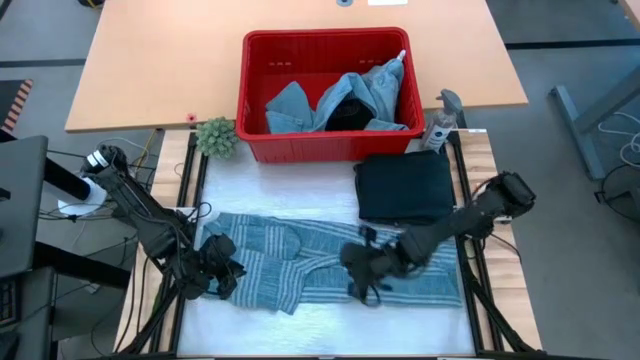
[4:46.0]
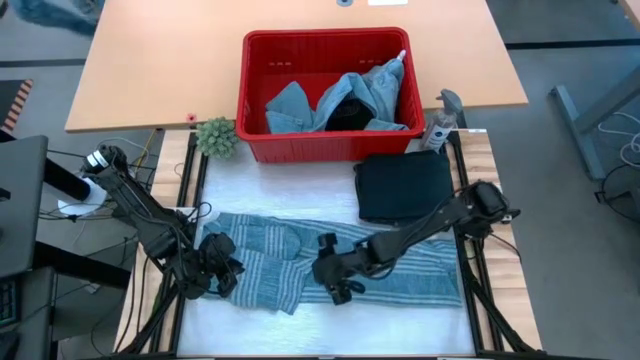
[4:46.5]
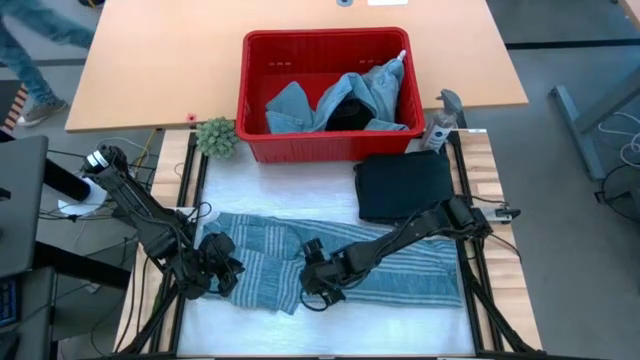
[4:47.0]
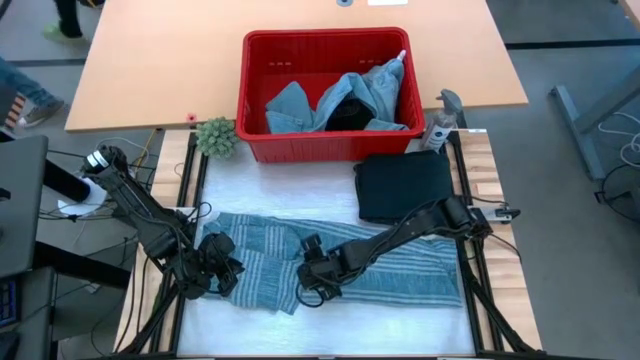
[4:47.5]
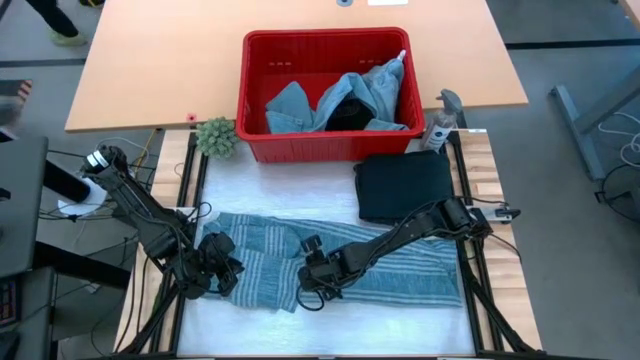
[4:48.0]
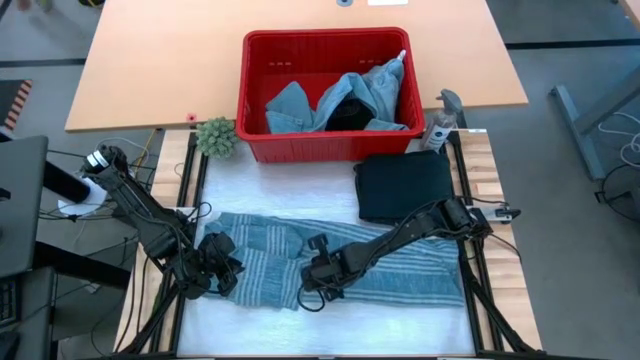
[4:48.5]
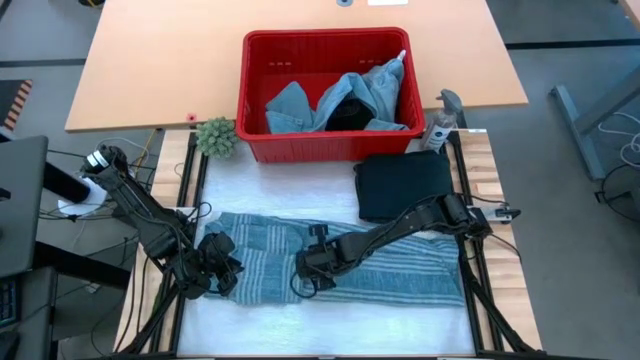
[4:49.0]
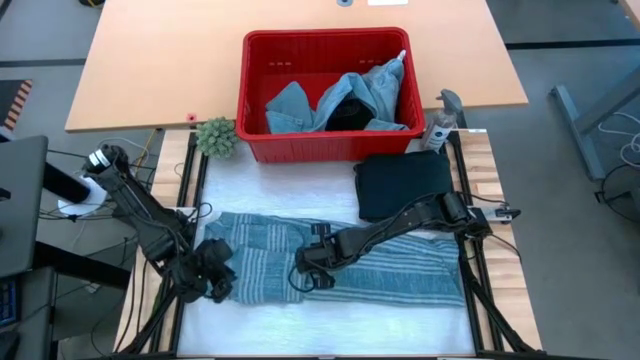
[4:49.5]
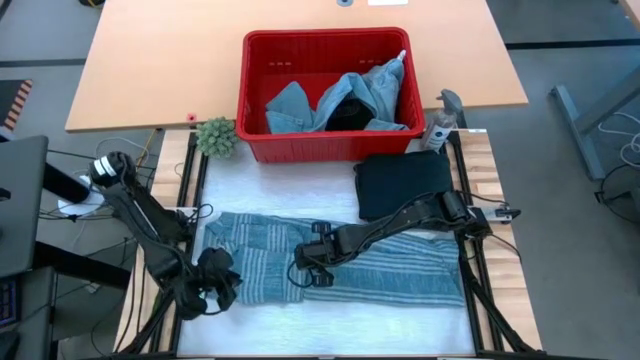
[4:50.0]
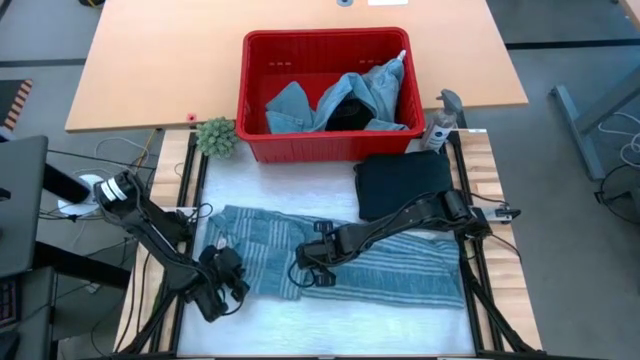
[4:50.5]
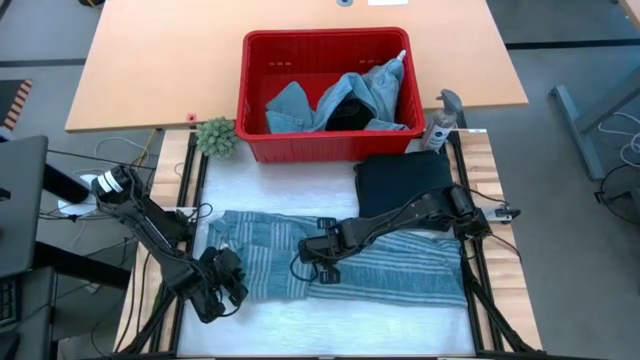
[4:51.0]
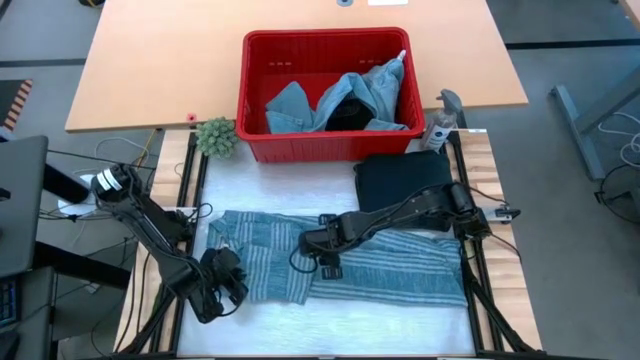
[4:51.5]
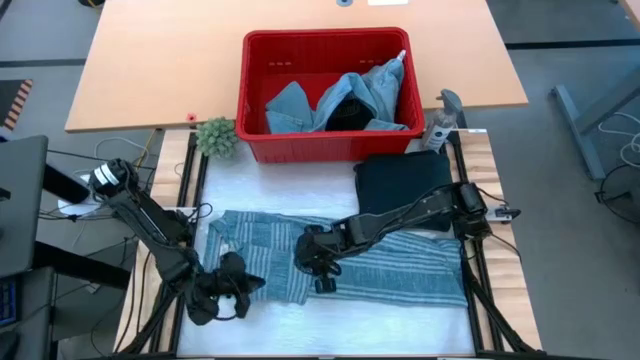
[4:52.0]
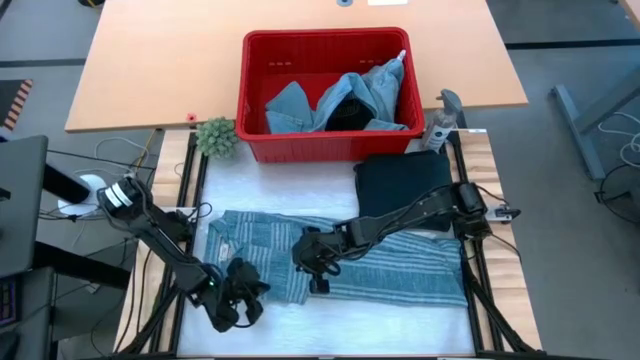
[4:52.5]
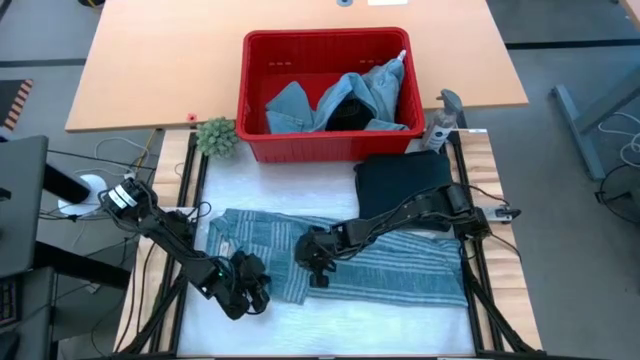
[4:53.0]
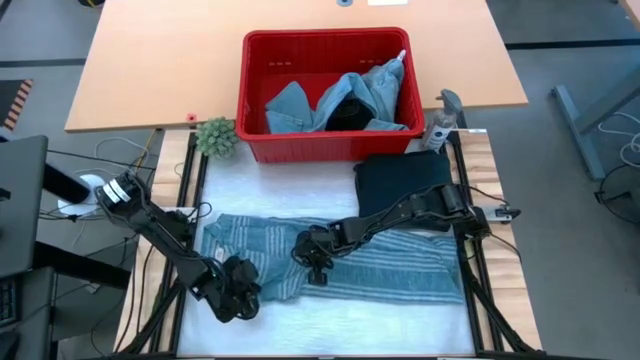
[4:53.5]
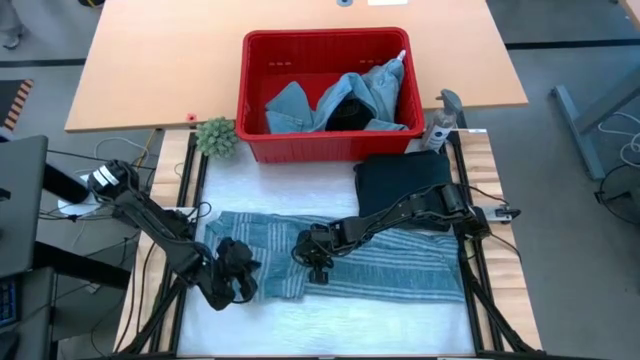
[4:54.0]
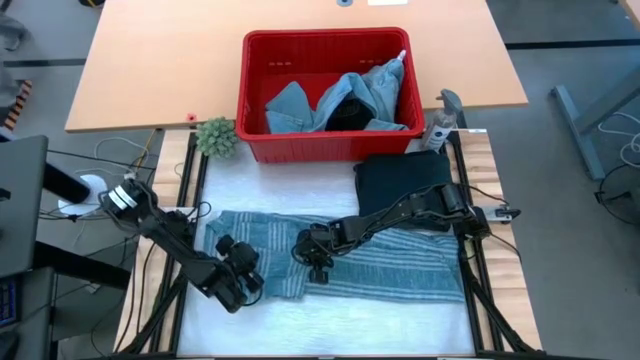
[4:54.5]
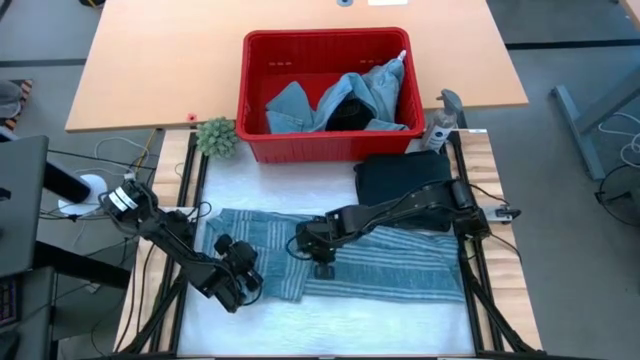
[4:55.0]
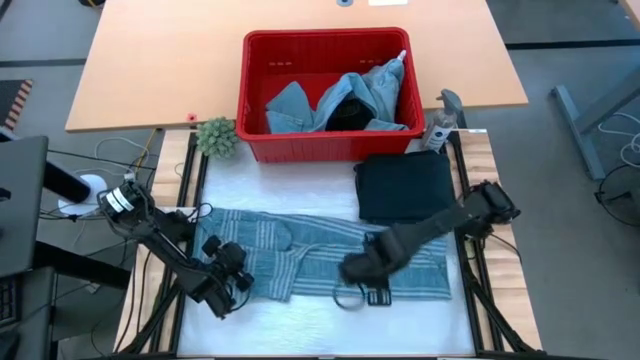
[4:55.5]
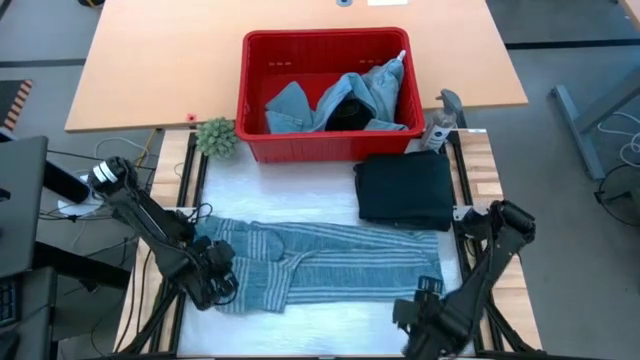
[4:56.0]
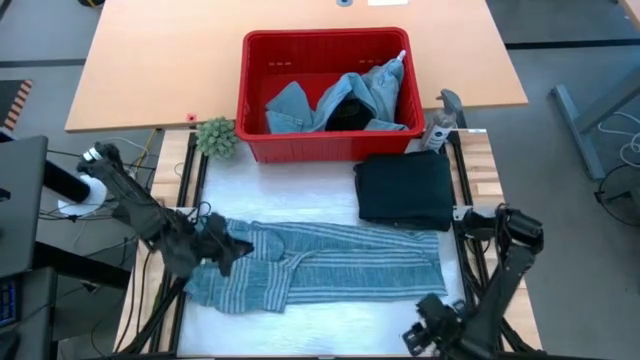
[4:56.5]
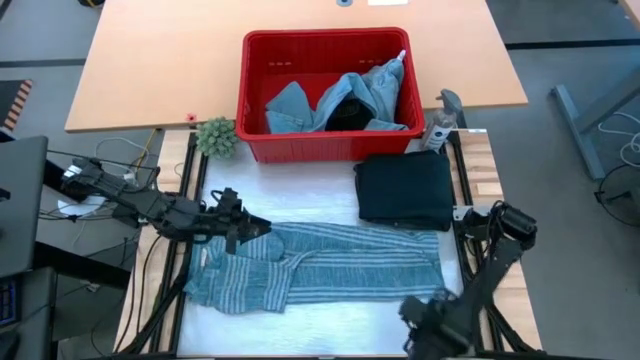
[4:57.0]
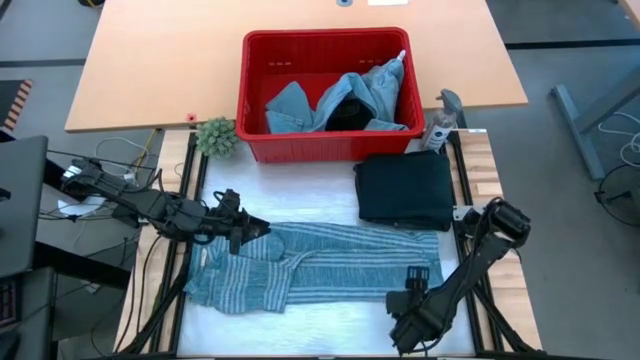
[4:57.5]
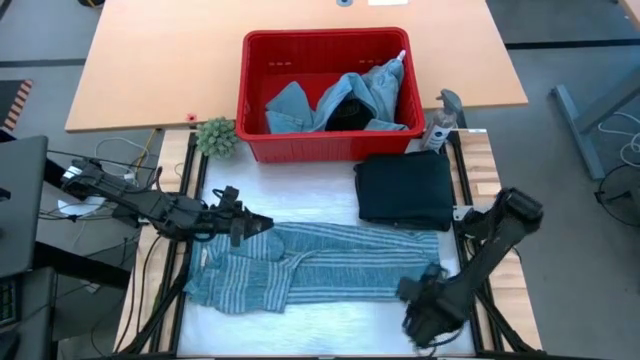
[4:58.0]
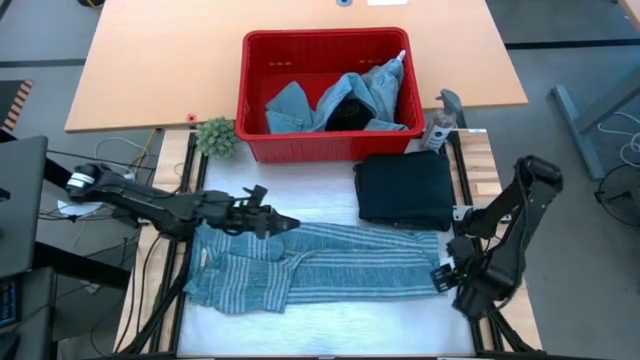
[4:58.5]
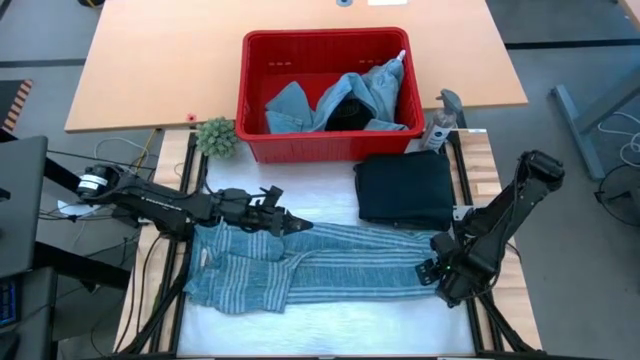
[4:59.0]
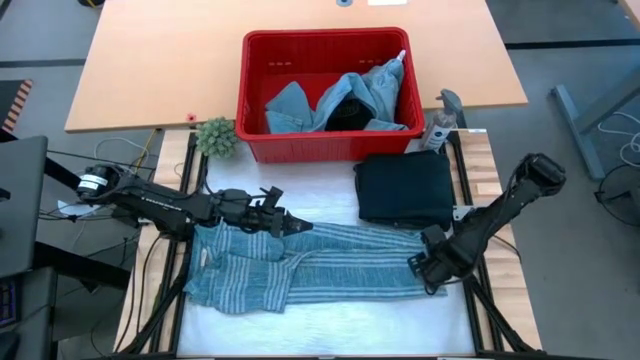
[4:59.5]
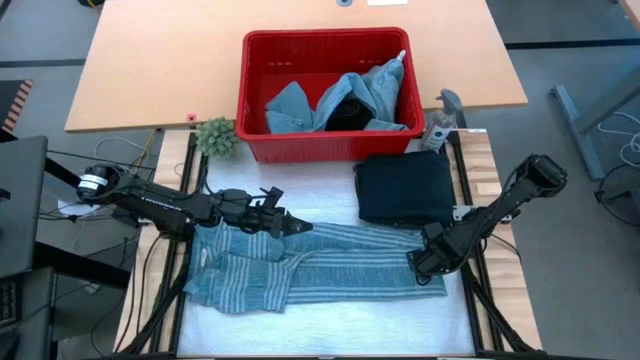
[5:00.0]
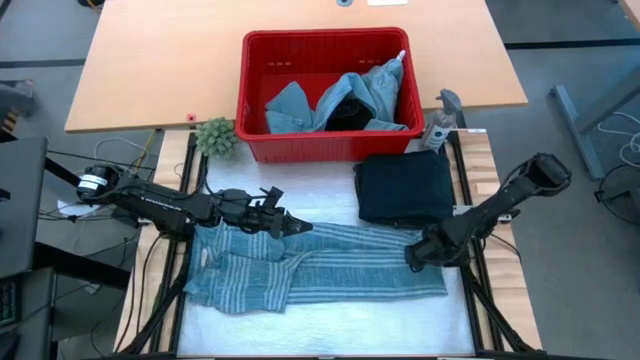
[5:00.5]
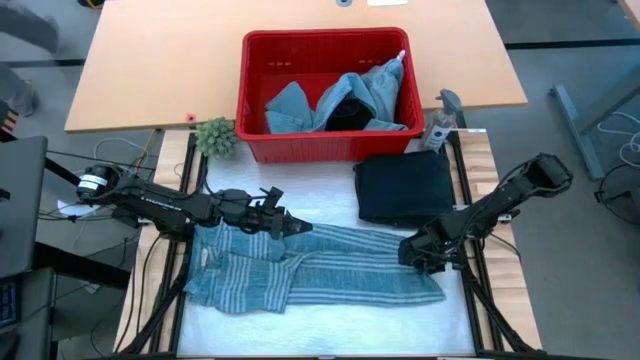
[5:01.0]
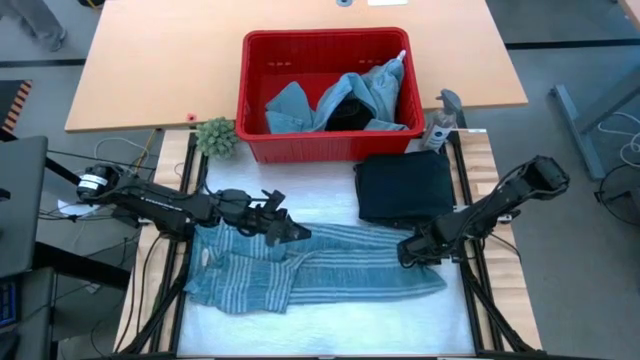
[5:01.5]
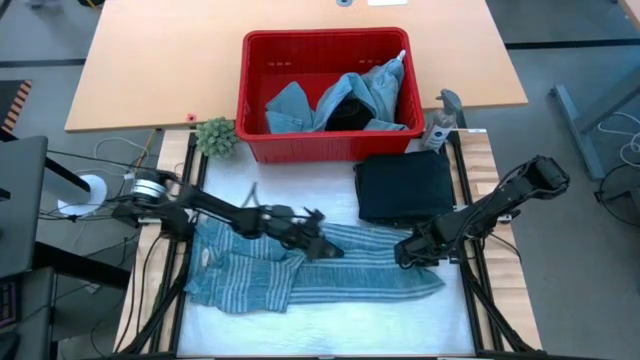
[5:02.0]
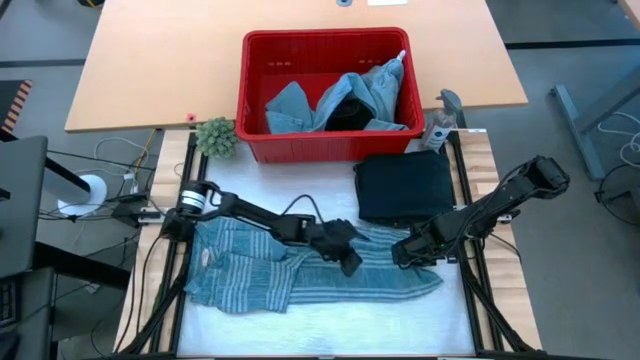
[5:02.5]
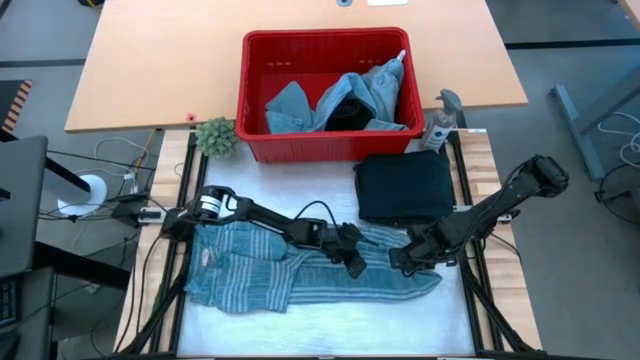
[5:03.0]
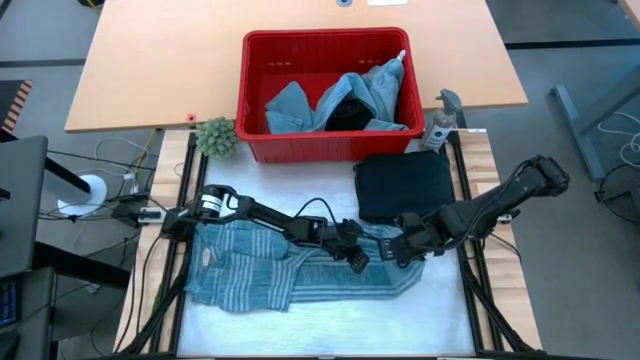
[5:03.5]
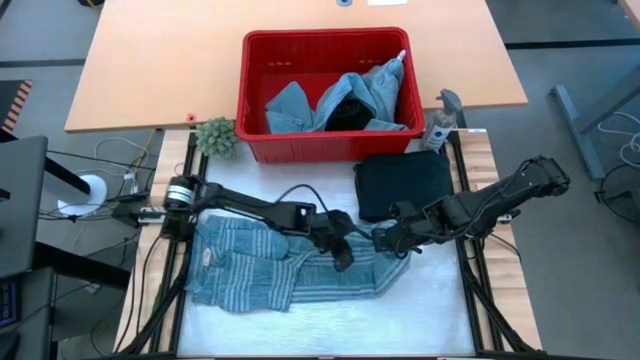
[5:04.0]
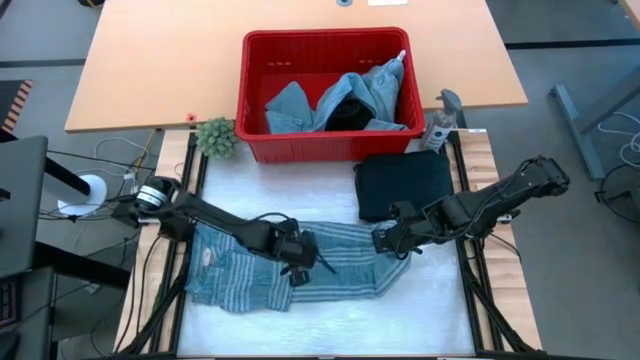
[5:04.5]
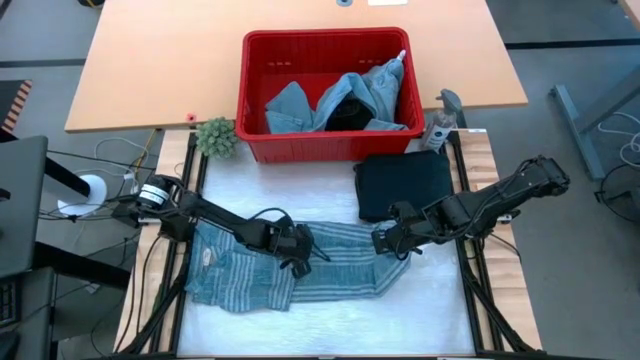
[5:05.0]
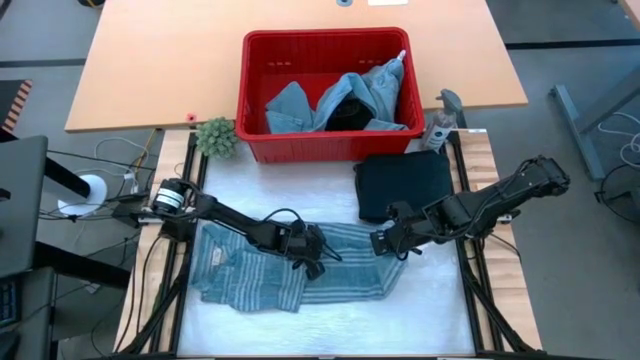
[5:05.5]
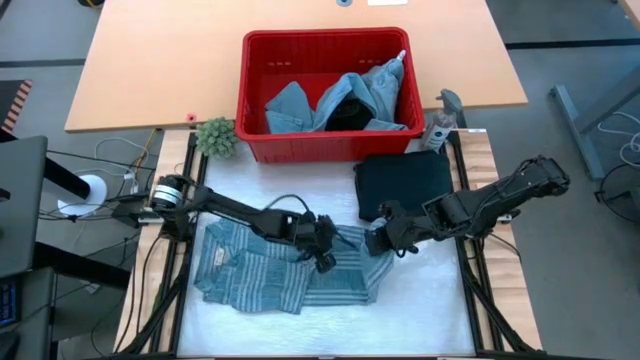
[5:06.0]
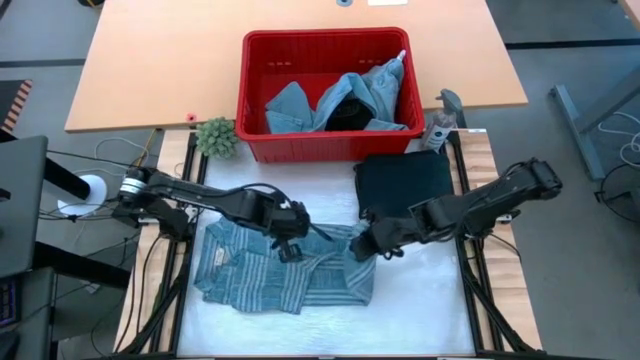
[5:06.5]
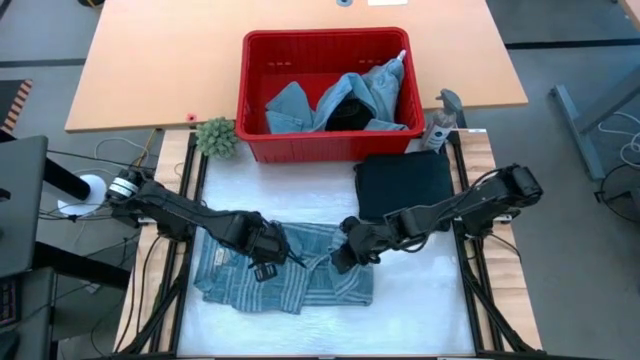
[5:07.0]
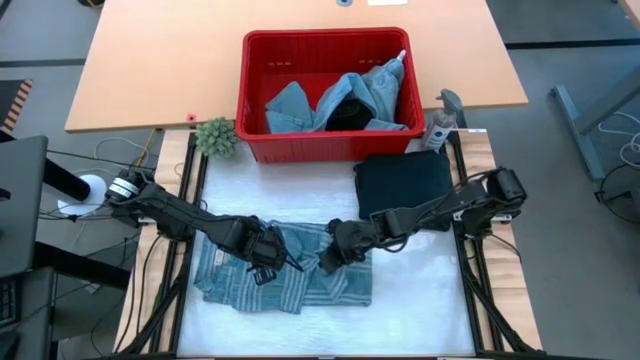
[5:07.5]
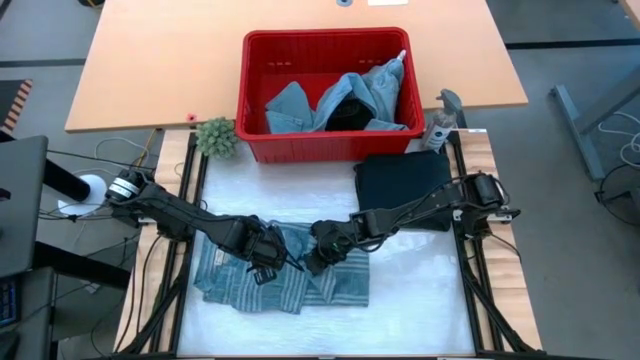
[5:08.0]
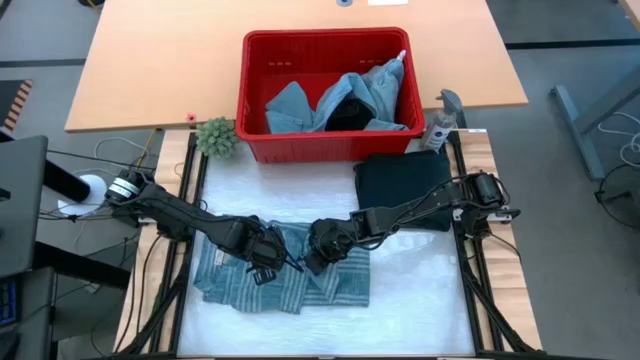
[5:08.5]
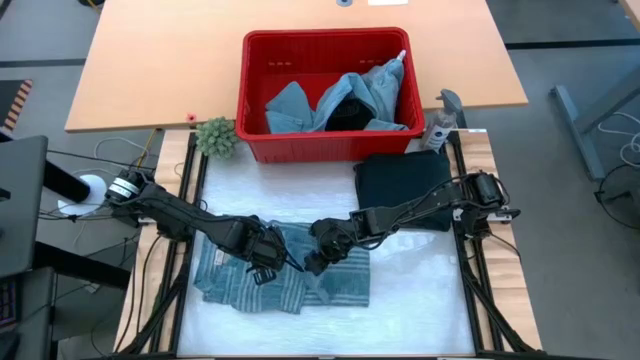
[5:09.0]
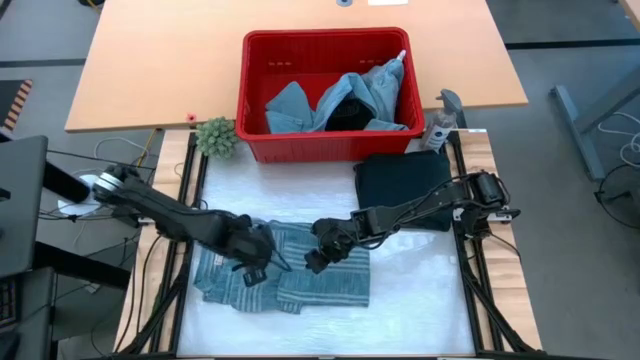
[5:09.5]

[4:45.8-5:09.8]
Task: Fold Laundry from Bin
Fold the blue polo shirt
